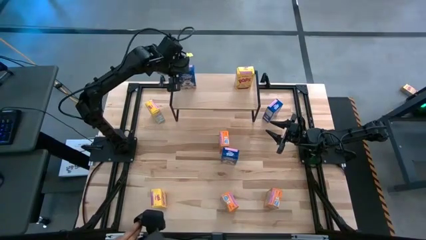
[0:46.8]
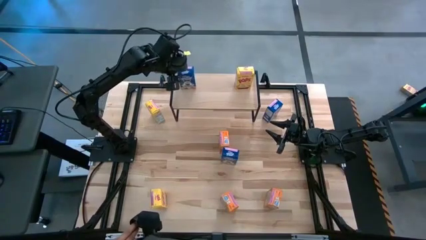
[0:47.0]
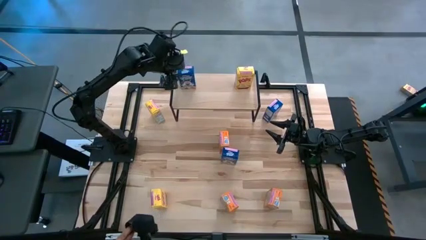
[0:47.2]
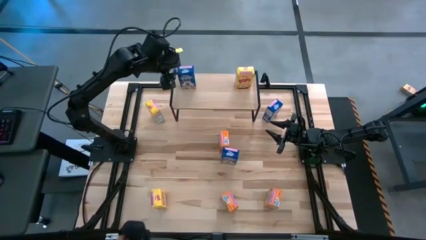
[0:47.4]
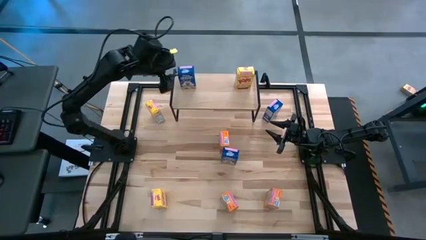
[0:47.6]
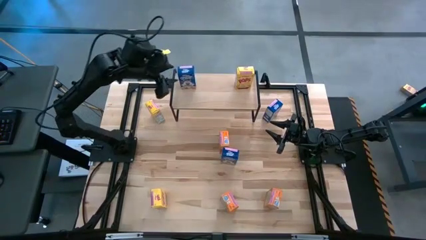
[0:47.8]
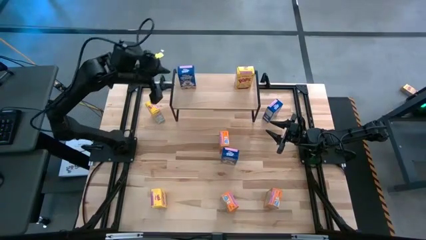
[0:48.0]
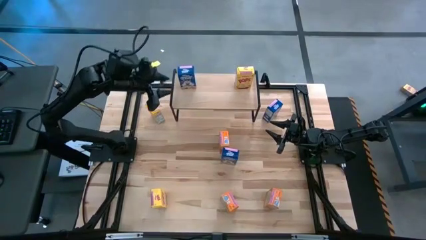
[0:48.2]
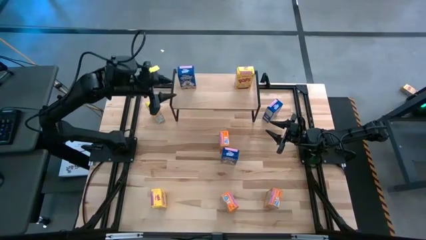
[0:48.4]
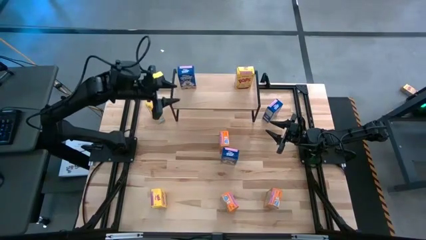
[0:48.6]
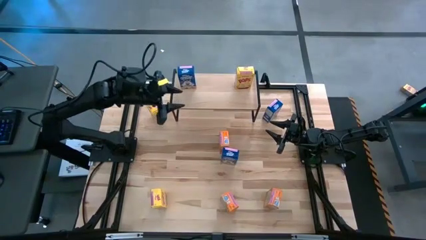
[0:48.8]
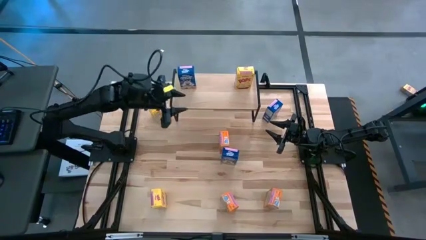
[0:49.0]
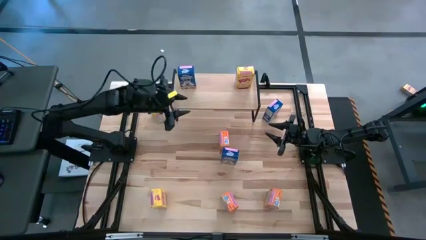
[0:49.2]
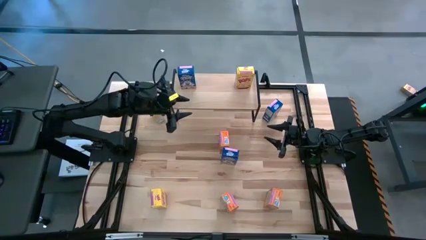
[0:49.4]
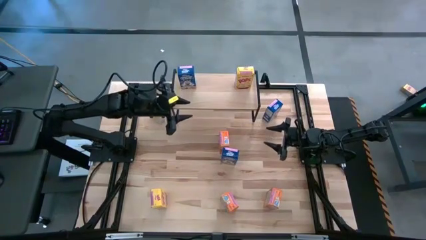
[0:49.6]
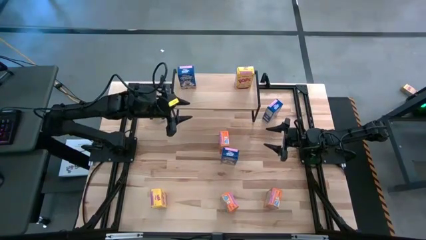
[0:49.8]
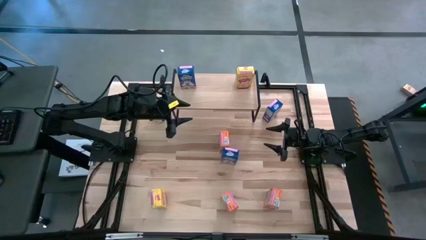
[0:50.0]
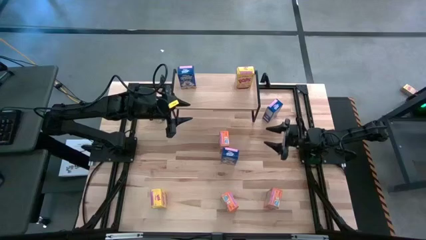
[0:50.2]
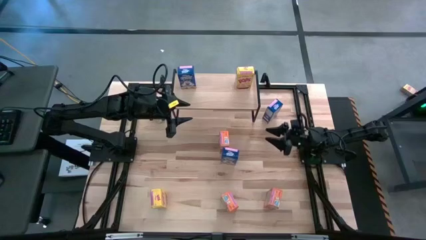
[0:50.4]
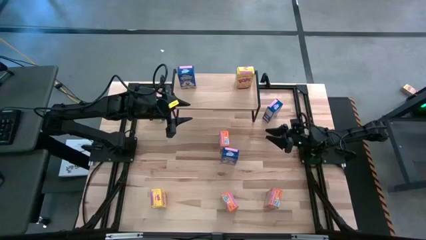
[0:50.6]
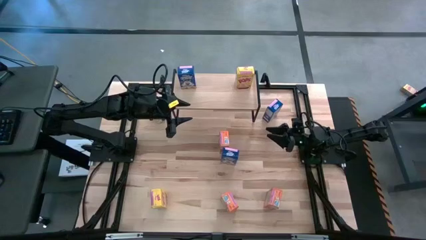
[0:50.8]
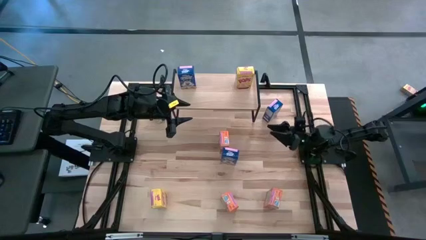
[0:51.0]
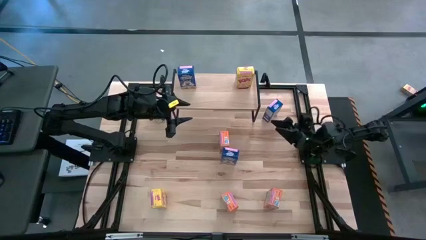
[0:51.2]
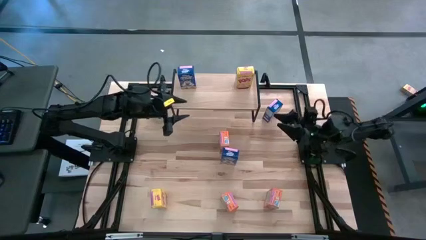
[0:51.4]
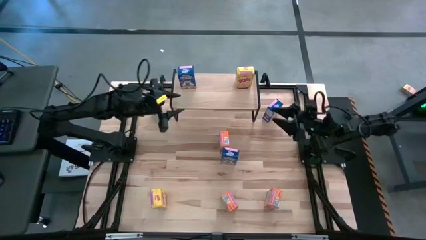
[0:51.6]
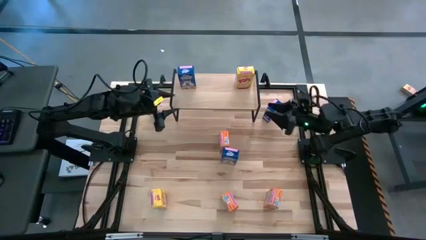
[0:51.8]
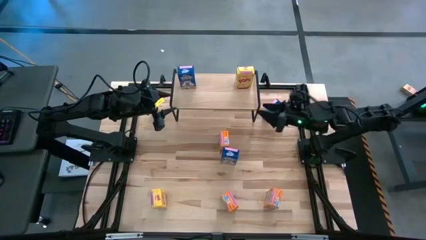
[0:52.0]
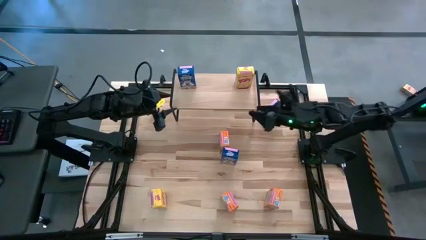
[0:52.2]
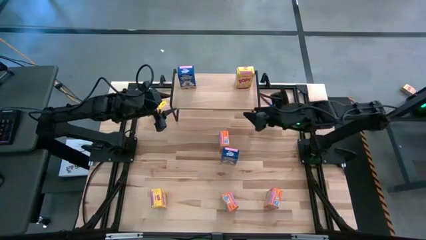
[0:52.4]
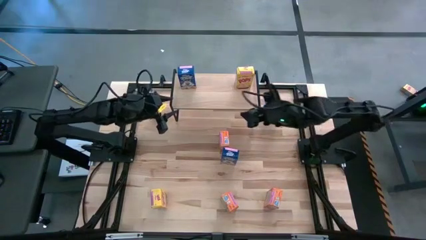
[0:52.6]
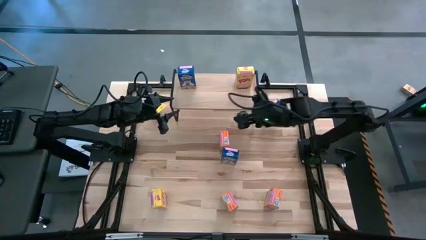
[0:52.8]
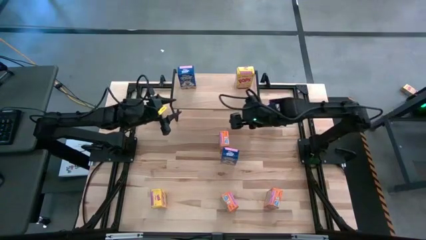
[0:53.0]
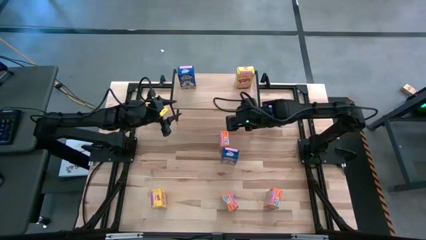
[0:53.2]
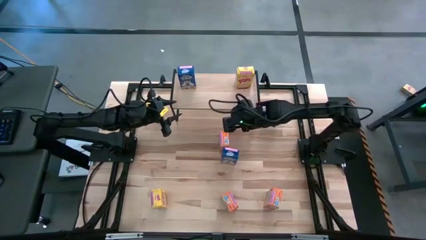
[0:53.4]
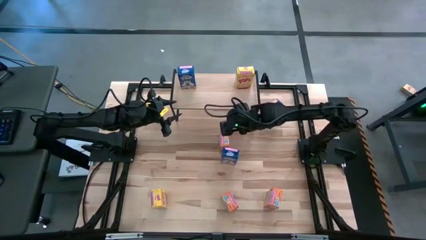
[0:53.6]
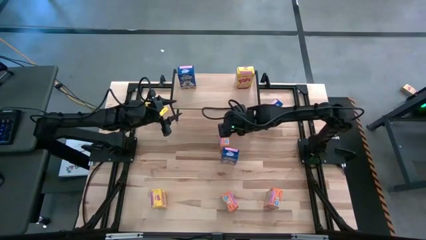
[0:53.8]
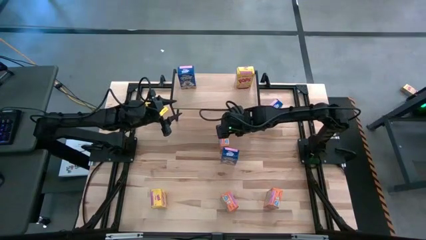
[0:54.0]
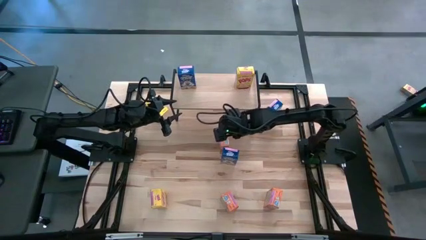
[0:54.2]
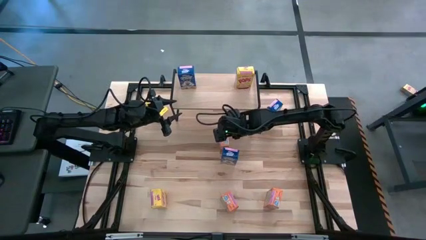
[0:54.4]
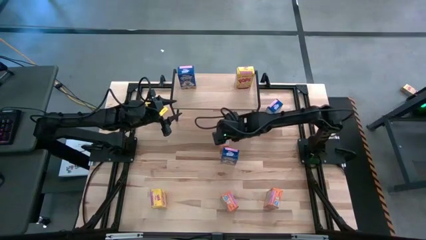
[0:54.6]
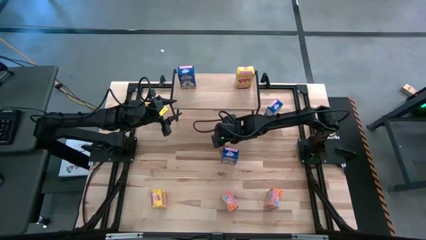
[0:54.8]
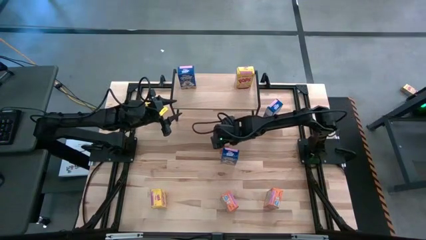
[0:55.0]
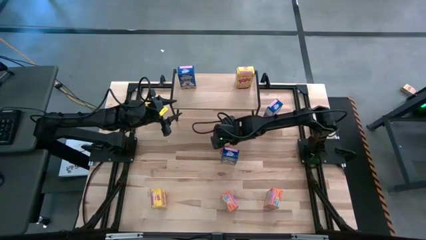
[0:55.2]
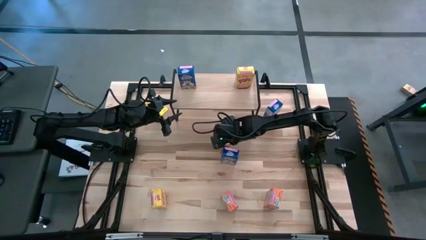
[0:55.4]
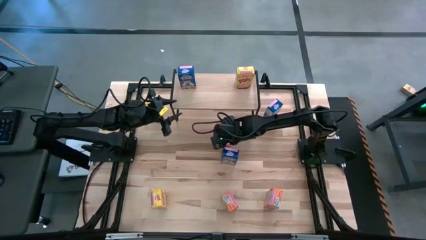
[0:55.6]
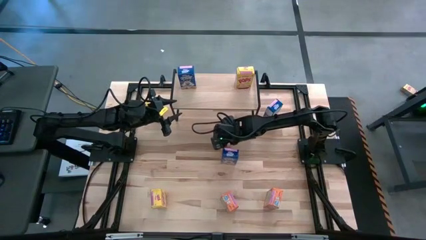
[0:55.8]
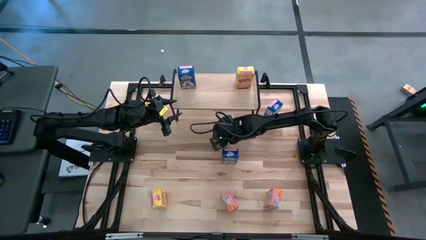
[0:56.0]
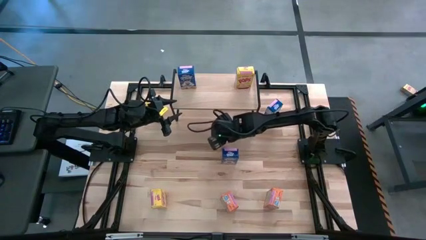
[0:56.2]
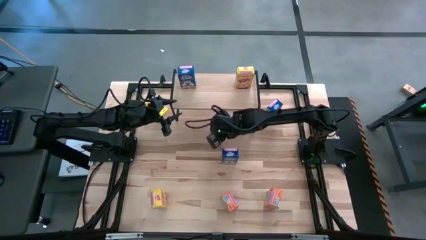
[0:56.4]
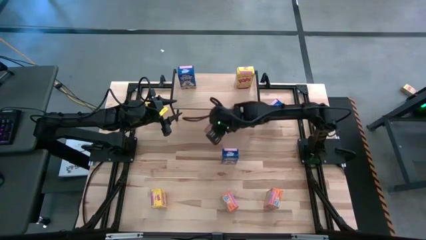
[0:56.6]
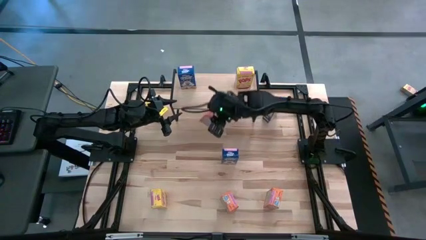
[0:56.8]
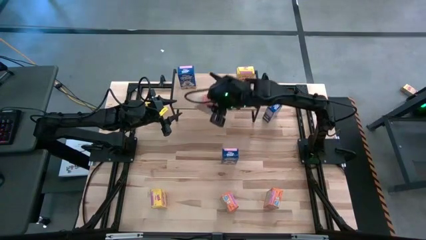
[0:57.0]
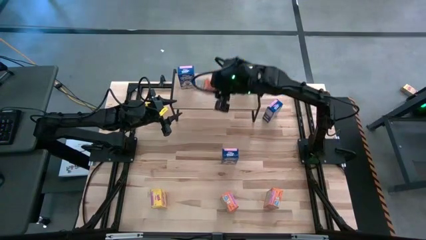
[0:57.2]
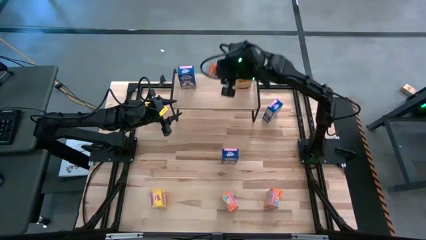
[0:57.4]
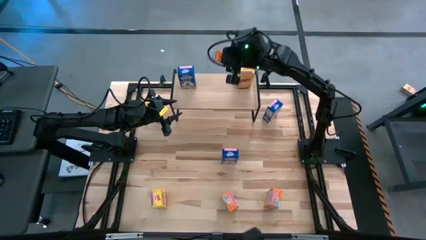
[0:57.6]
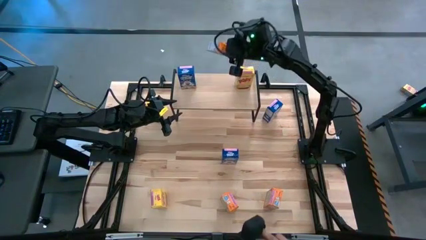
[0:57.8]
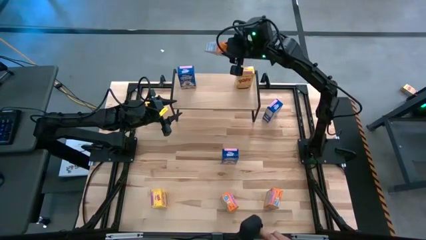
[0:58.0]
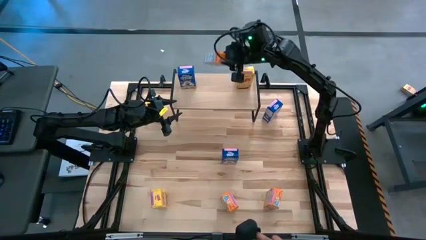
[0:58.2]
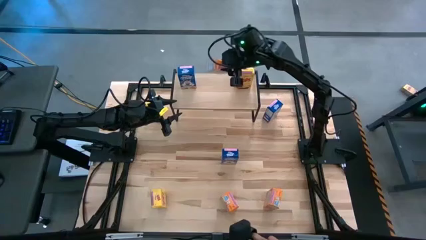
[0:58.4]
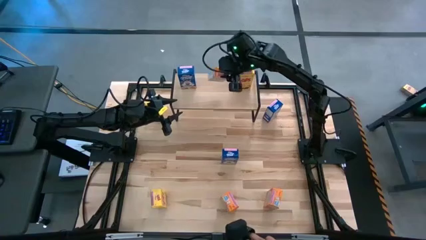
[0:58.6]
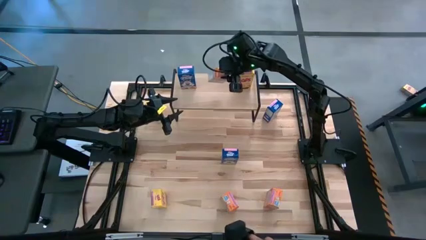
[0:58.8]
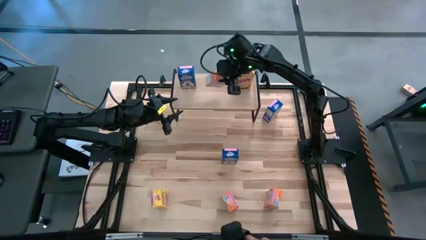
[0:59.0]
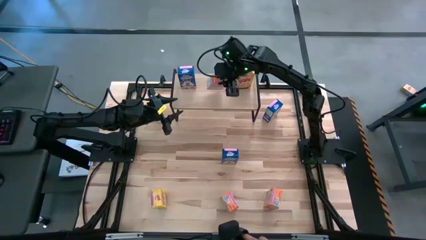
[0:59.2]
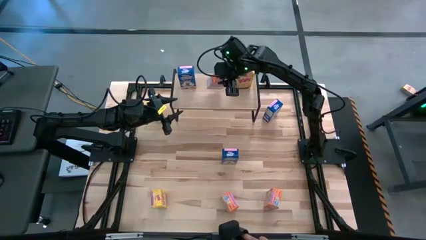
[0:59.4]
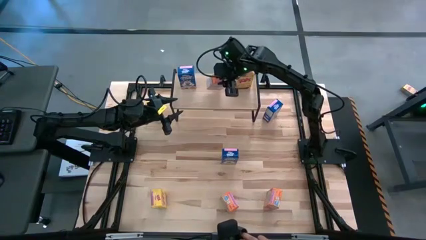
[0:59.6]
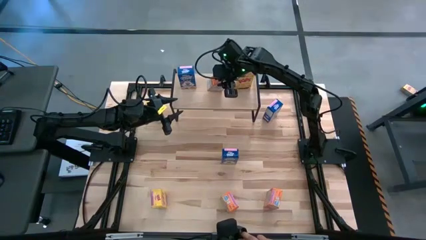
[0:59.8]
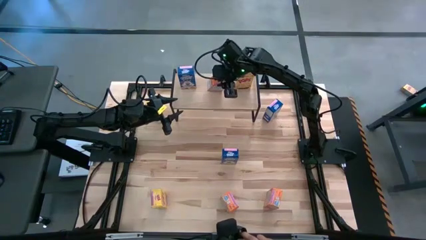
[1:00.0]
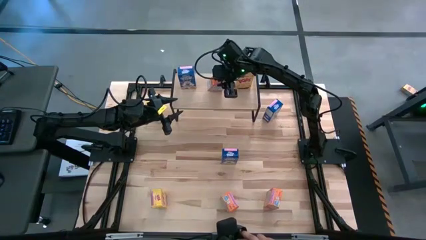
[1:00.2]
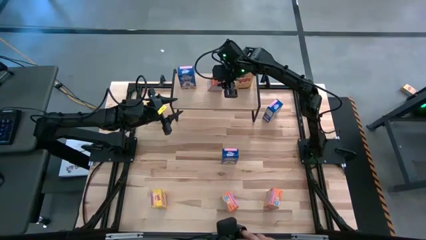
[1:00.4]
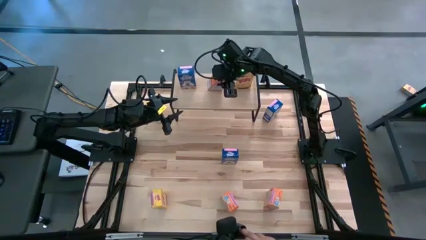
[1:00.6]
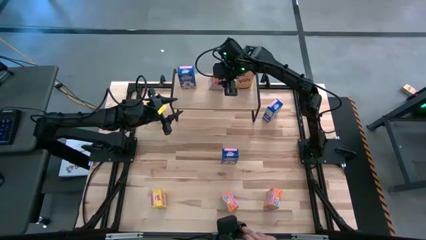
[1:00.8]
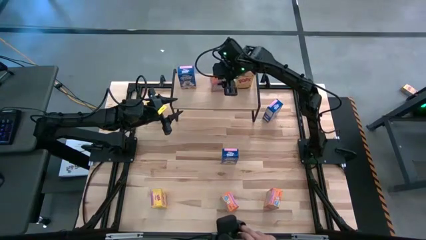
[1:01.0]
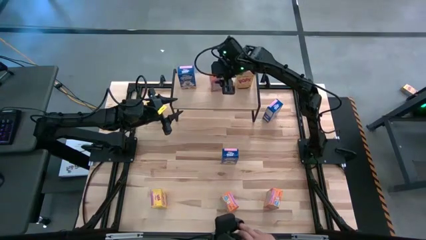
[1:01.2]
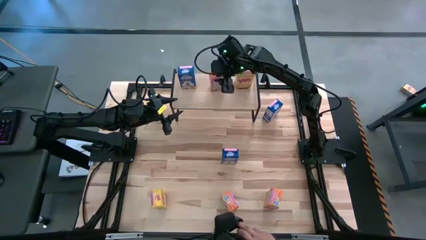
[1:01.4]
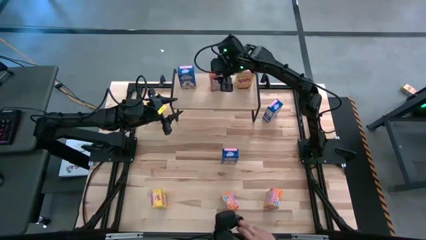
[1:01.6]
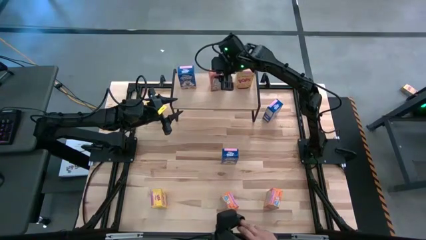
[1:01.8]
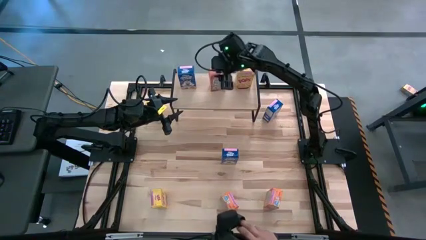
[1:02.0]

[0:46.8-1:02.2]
Task: Stack cereal on shelf
Put the top orange cereal box on the shelf
